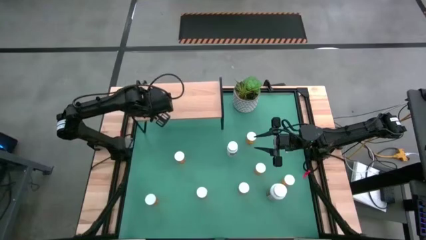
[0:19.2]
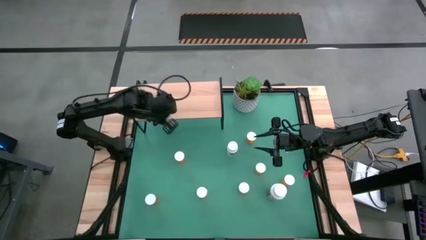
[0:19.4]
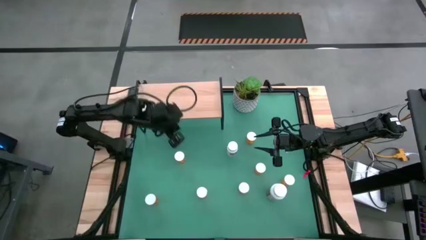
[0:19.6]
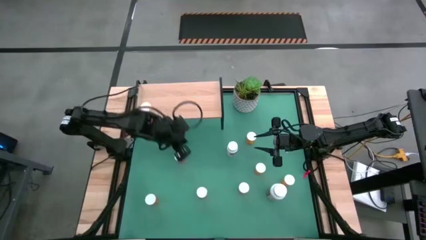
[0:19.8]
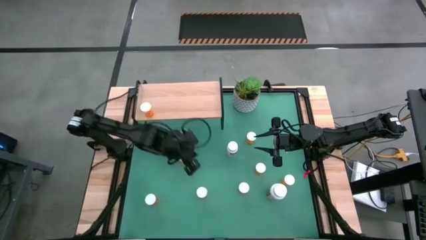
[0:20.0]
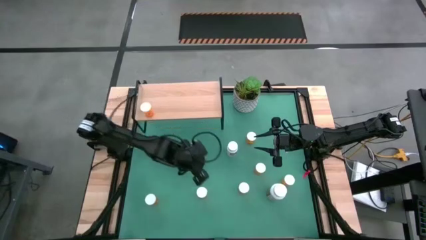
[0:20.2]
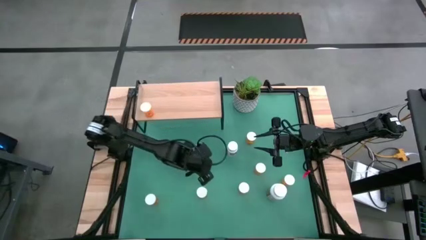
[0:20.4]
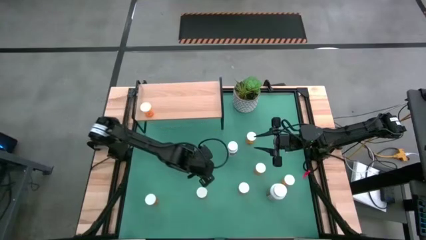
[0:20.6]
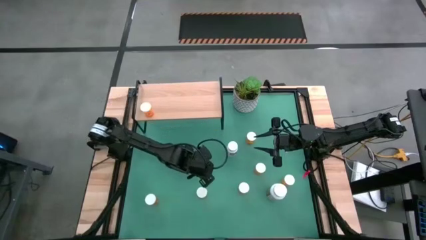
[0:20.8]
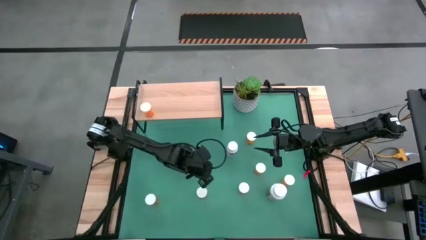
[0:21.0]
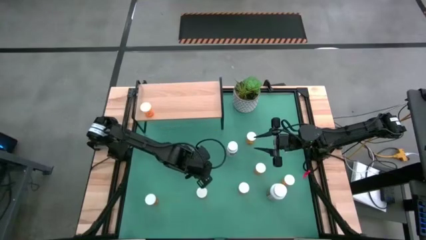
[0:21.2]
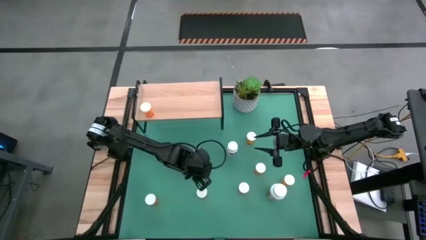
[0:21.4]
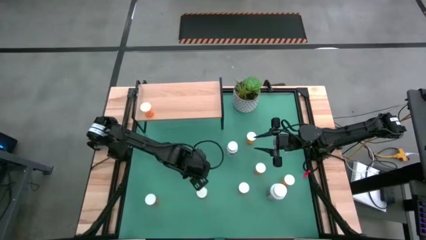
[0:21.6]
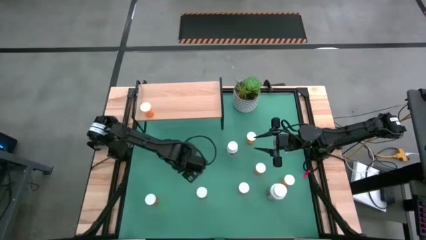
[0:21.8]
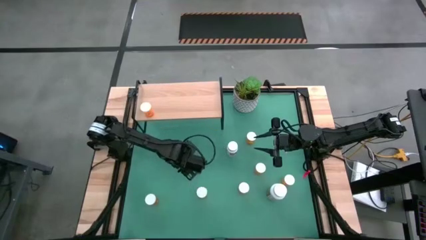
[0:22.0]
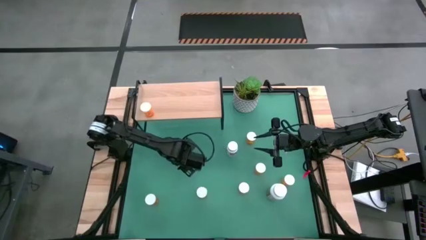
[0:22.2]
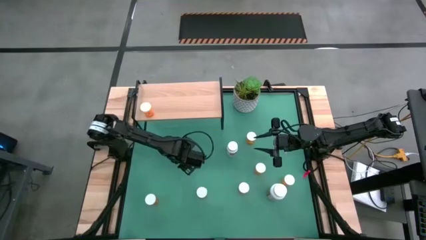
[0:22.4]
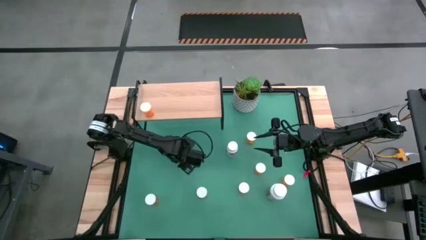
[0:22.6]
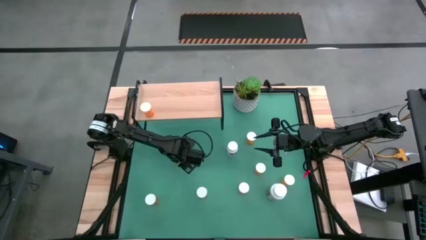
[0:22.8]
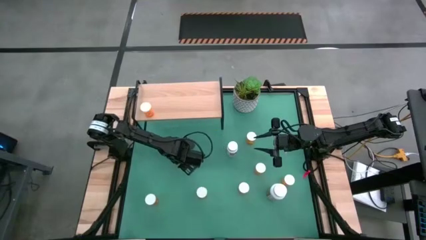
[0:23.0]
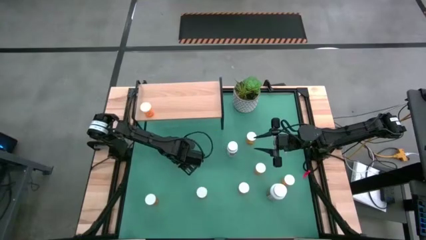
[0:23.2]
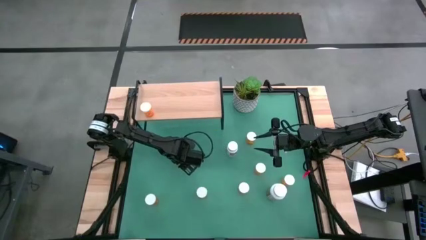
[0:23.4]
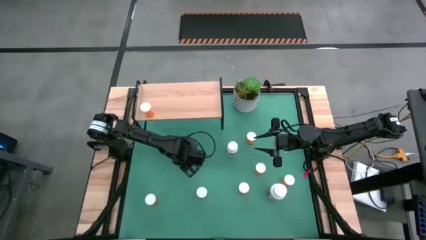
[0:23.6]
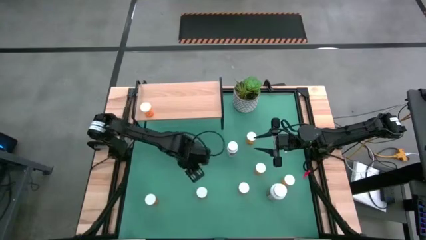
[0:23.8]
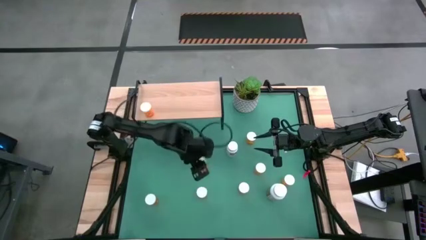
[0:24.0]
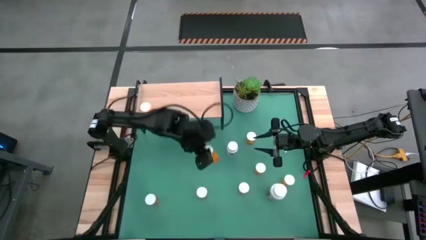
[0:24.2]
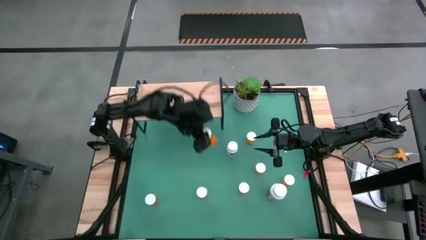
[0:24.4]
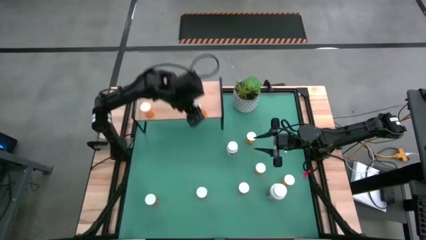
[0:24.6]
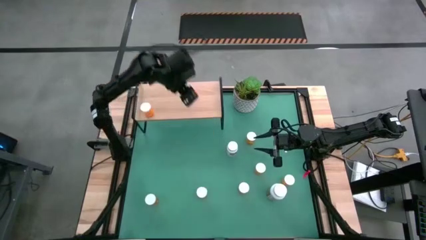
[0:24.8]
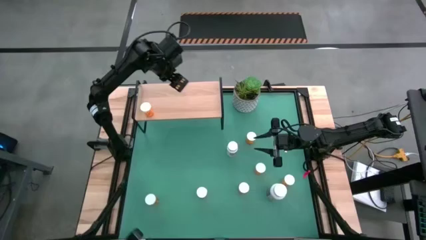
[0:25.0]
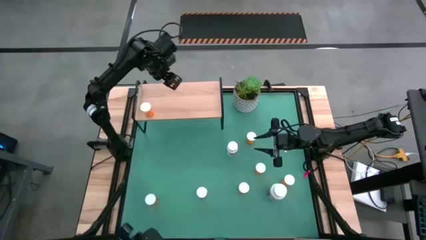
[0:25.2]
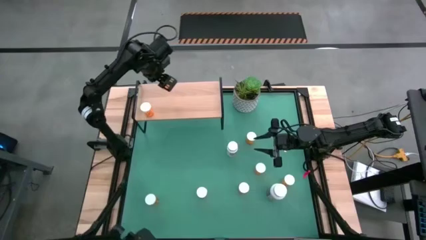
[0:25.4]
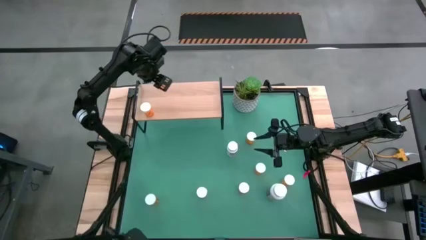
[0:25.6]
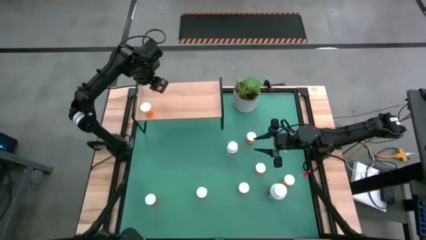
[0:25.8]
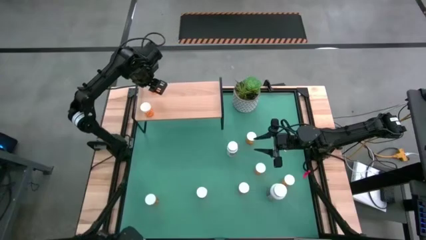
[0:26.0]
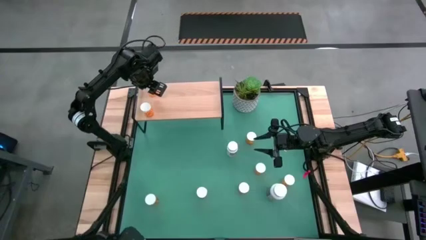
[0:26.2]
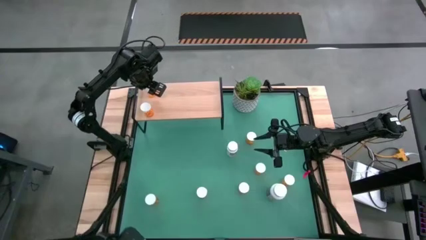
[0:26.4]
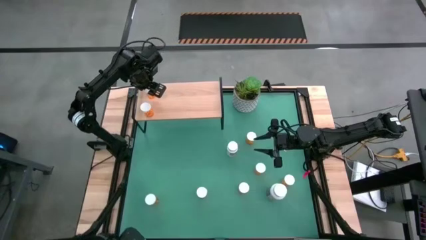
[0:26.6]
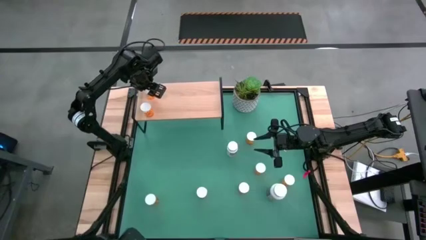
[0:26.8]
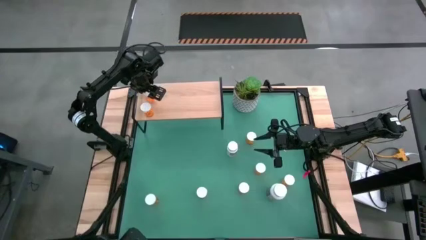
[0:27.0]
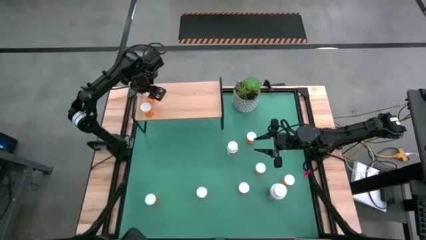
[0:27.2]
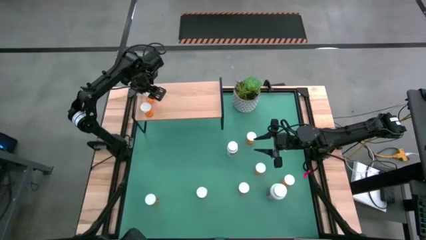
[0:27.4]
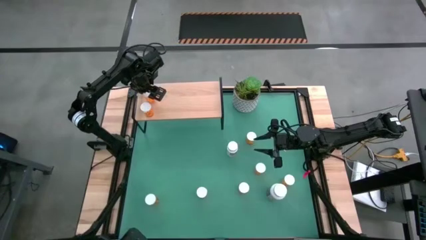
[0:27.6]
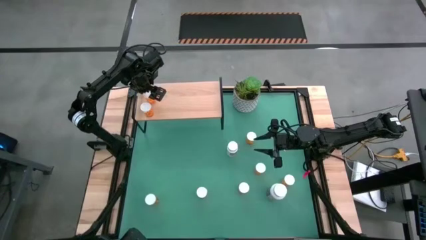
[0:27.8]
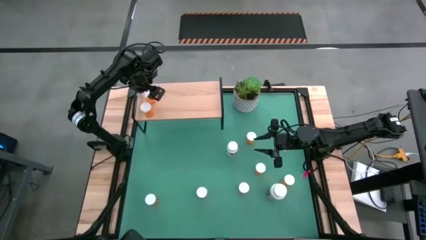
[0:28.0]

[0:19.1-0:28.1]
Task: Pick and place medicine bottles onto shelf by color
Put the orange pill bottle on the shelf aligned with the other orange pill bottle

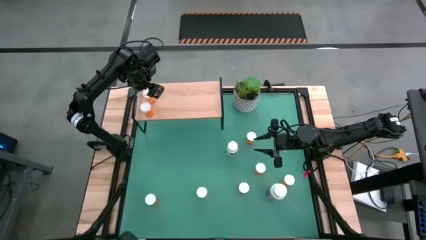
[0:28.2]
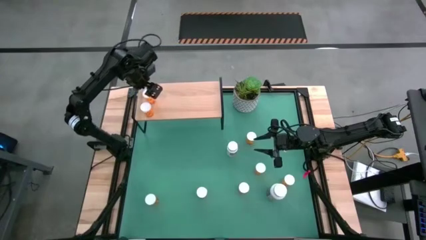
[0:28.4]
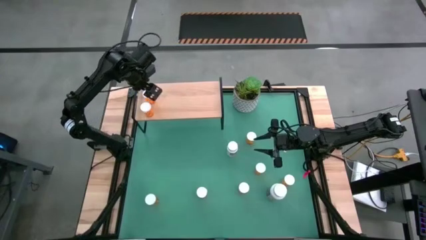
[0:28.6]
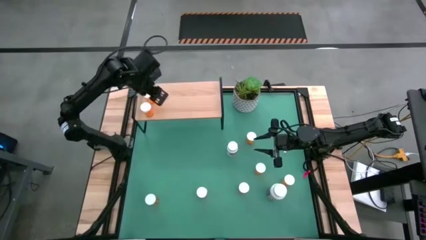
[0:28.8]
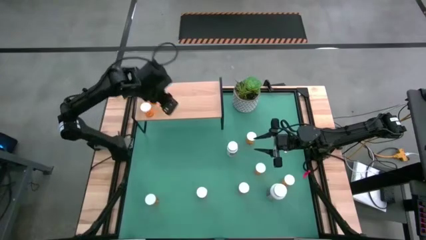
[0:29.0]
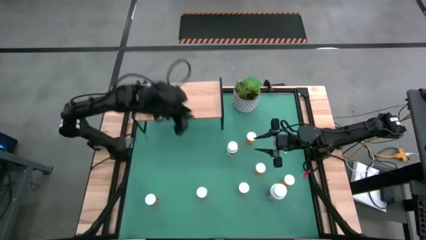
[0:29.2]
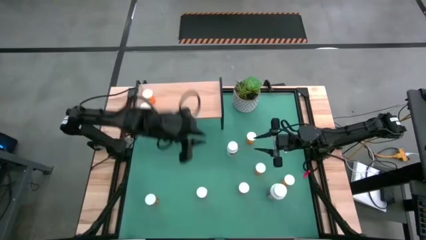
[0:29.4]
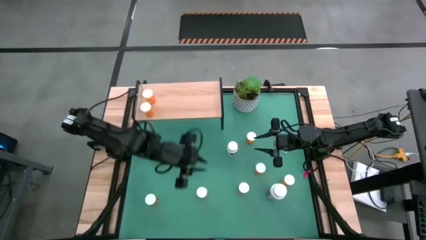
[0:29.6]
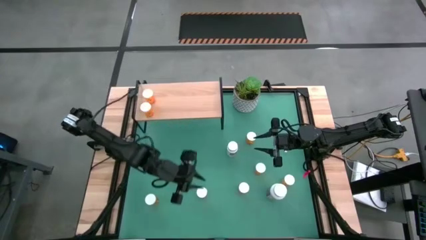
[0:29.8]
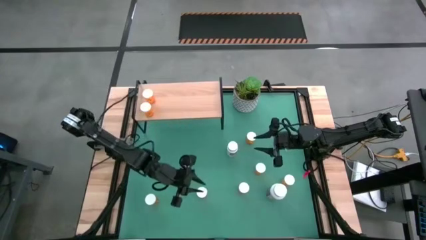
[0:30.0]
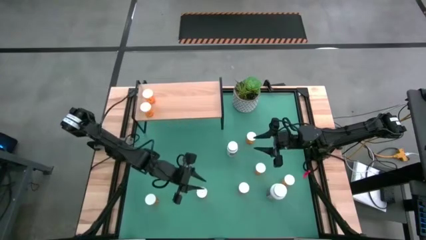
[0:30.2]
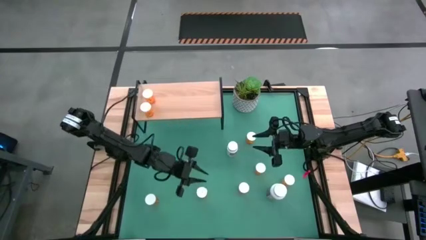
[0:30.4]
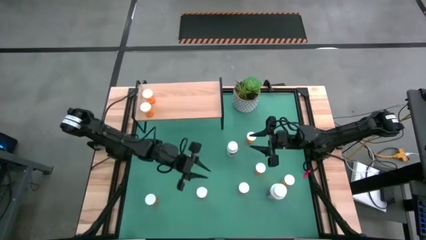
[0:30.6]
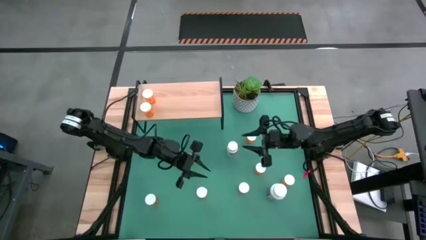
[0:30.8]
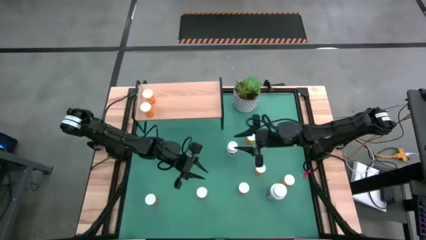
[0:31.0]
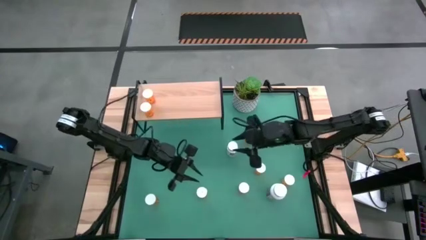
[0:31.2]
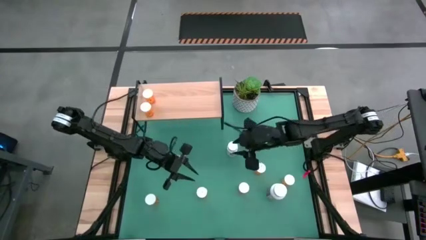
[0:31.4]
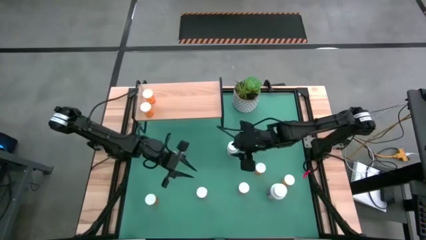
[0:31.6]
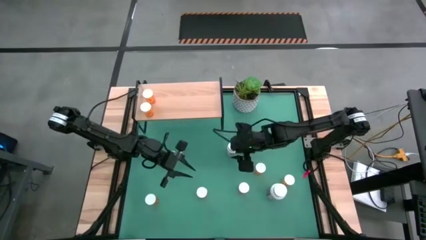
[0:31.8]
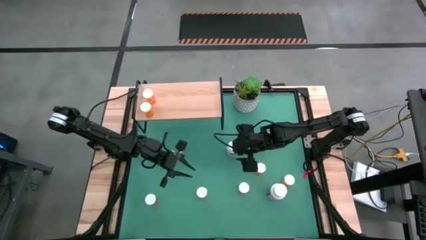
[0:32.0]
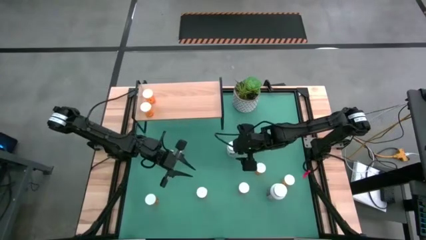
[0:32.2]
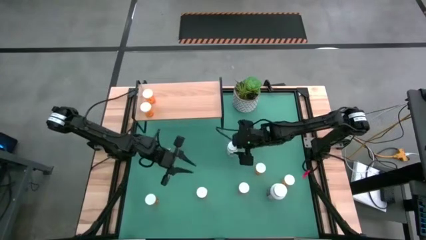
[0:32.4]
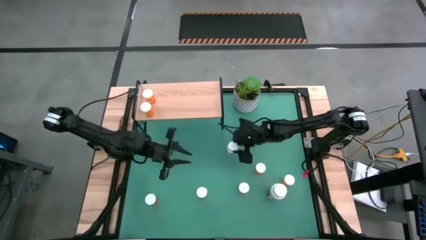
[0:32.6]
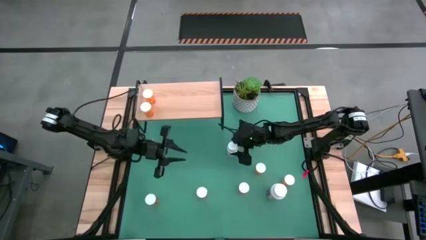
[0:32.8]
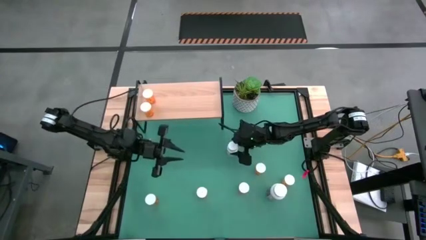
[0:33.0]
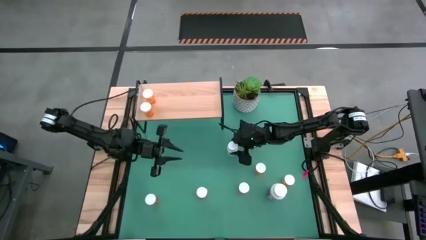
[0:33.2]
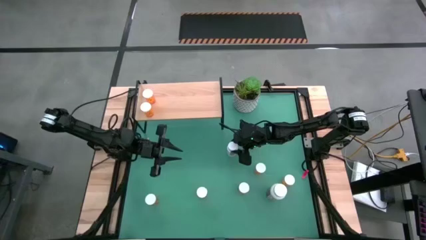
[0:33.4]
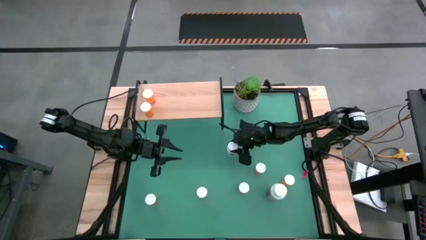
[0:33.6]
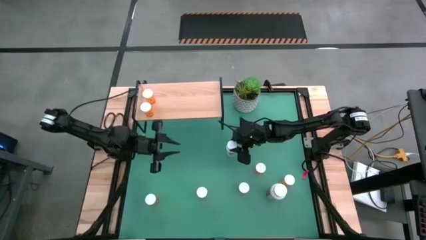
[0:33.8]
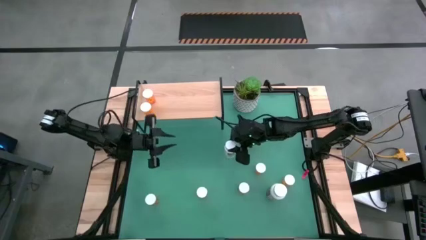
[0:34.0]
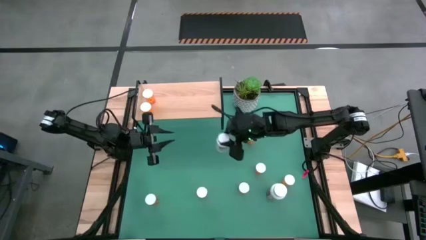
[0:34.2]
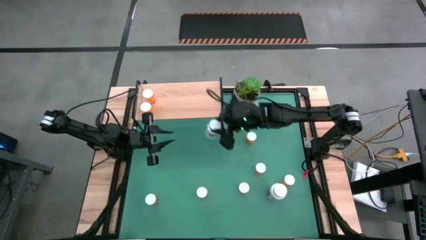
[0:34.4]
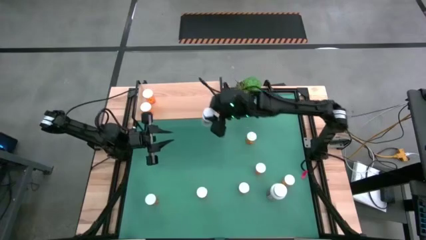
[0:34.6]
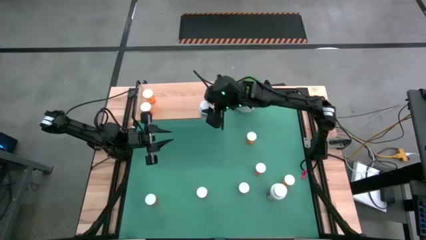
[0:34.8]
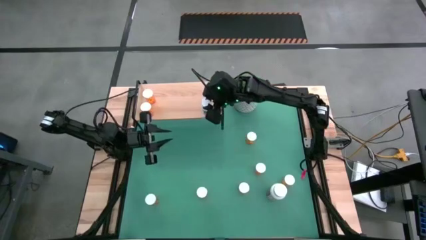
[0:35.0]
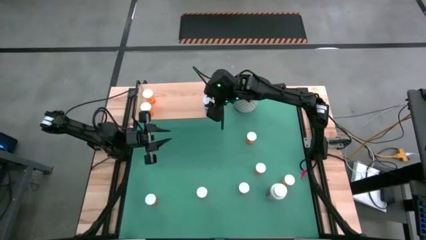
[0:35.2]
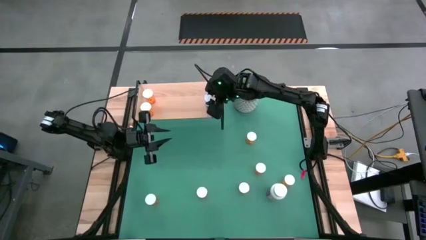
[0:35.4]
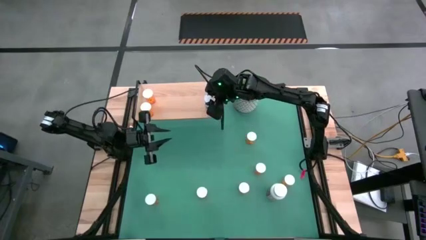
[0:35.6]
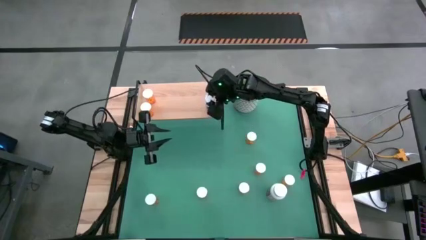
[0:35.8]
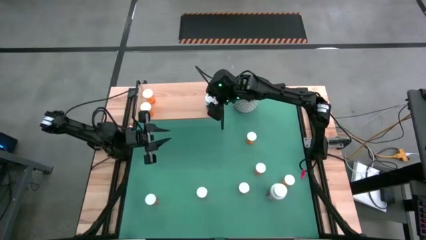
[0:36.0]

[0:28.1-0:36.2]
Put the small white pill bottle on the shelf
